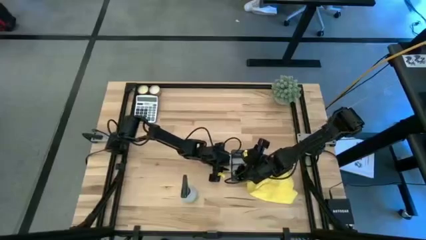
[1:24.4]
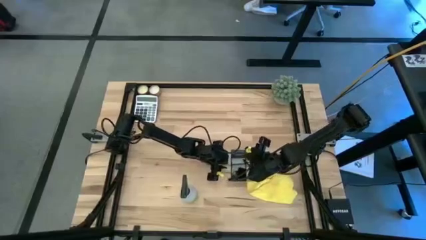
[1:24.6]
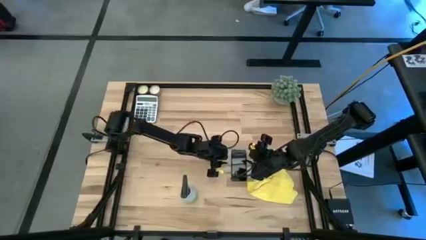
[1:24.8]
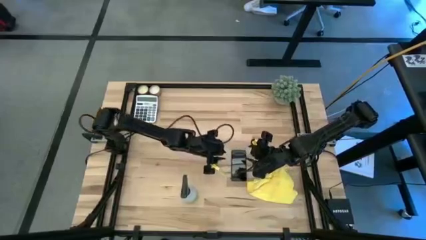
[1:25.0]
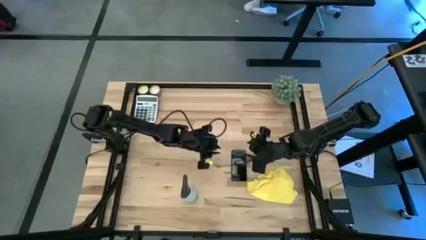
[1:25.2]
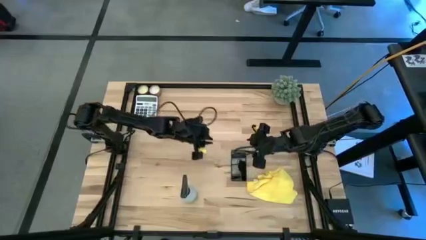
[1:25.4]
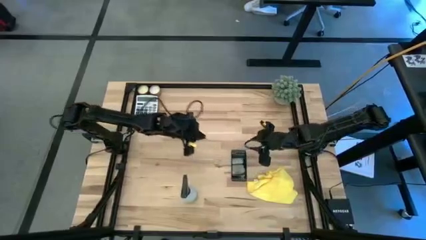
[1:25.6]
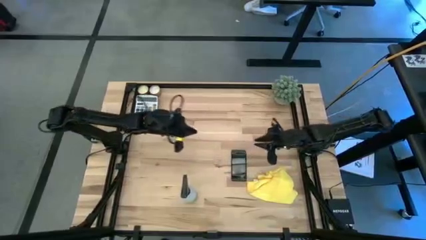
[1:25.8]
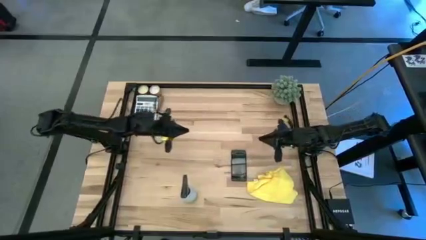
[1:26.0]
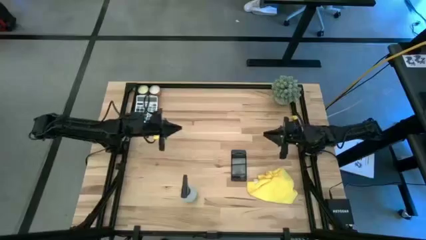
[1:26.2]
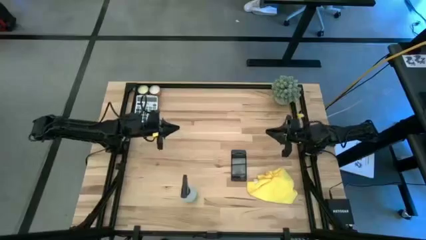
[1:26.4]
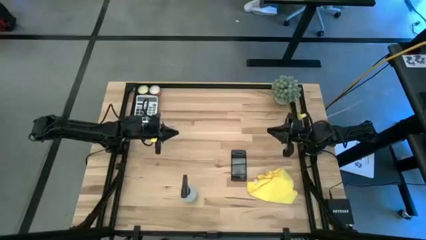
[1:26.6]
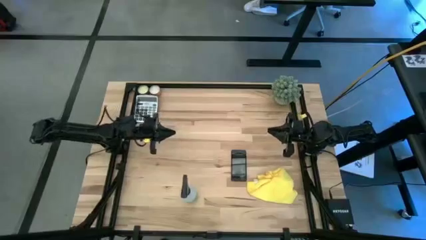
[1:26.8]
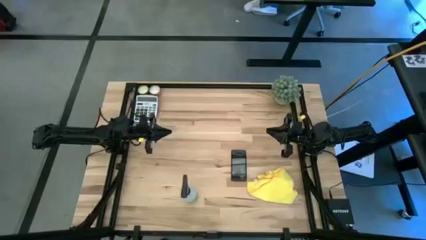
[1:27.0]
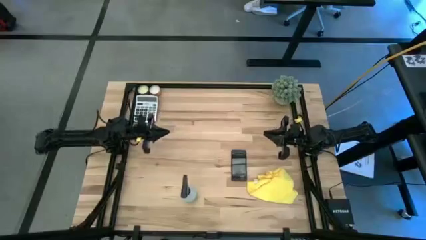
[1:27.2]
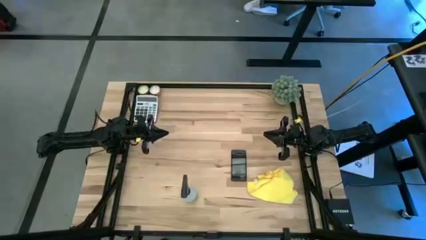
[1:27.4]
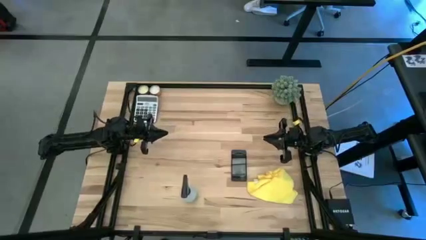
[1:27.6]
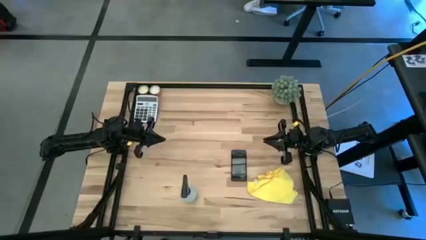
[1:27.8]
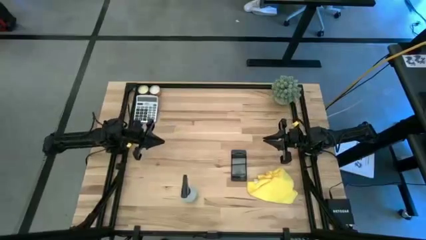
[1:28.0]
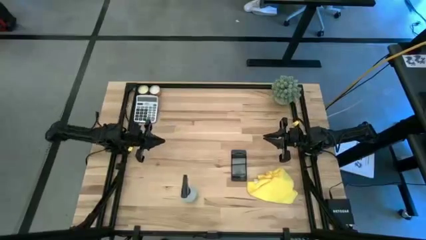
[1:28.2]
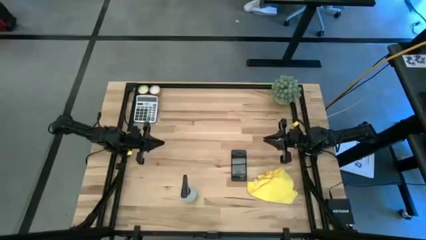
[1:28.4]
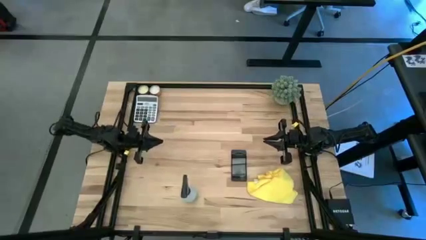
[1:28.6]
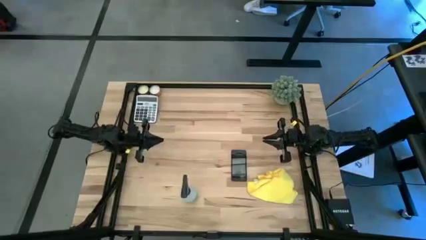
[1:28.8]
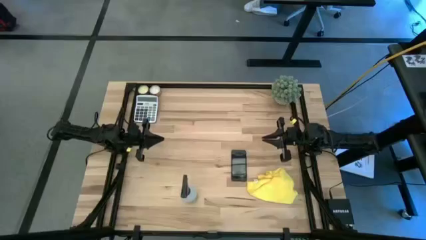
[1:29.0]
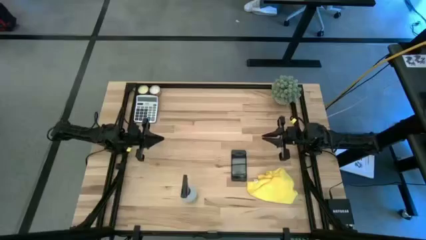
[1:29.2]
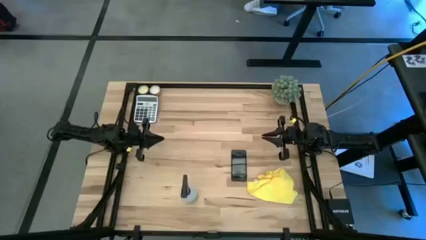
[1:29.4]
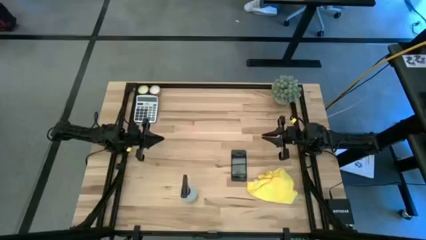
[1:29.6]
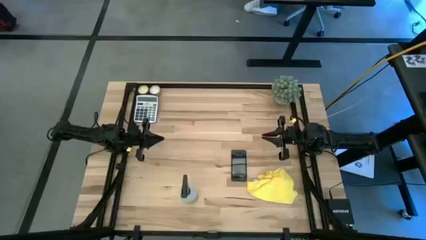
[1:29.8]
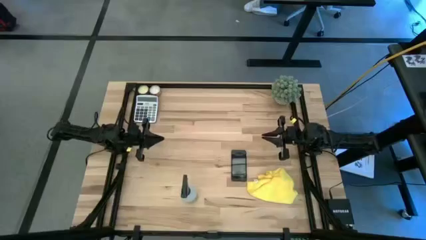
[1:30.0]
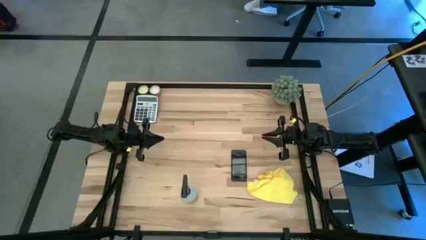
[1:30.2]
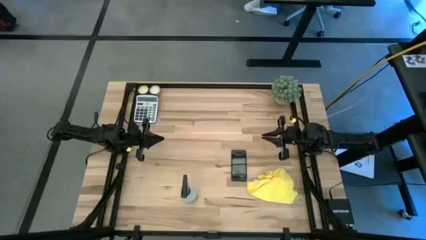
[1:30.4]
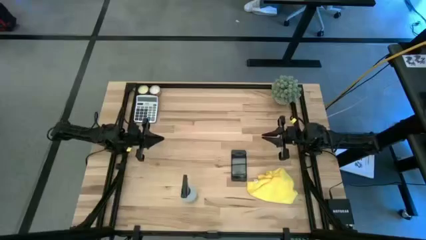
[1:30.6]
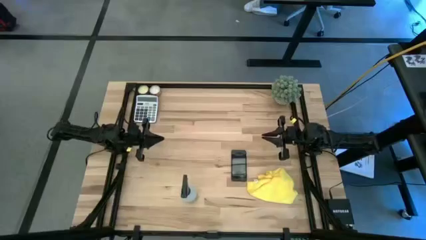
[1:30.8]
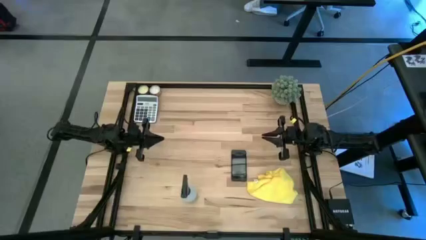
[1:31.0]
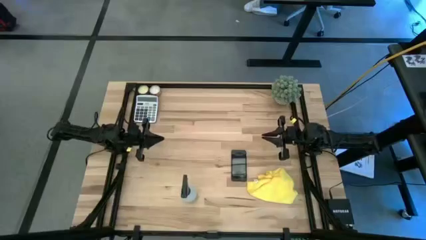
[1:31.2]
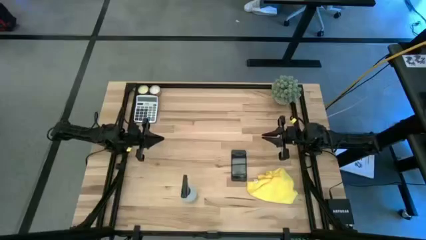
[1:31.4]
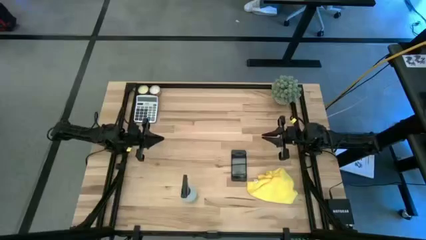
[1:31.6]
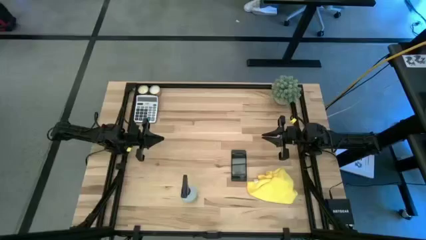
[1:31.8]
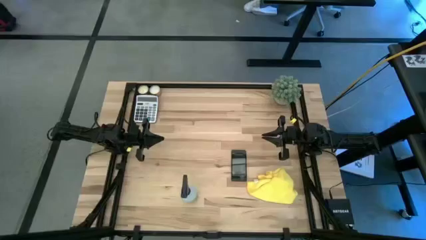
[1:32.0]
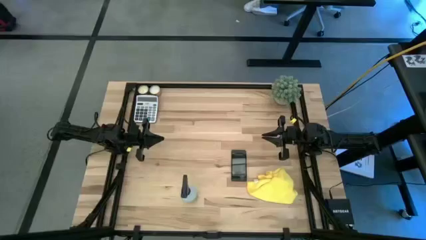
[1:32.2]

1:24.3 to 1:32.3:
Task: Apply microfiber cloth
Return to Home Position
